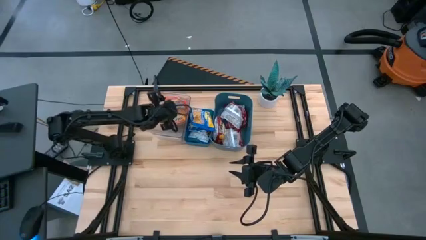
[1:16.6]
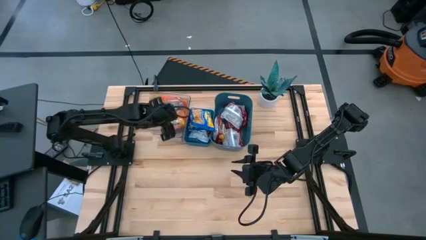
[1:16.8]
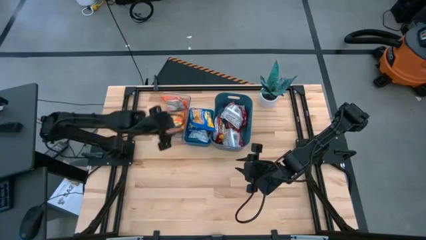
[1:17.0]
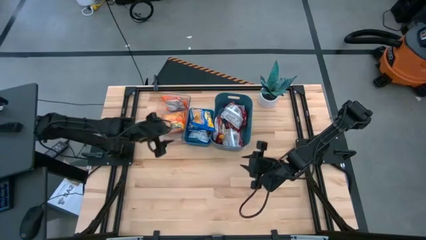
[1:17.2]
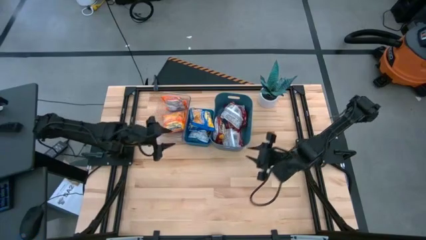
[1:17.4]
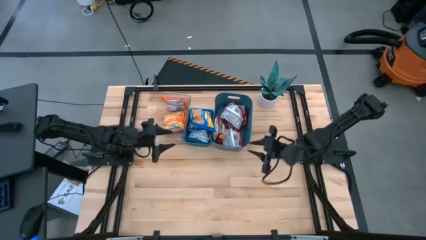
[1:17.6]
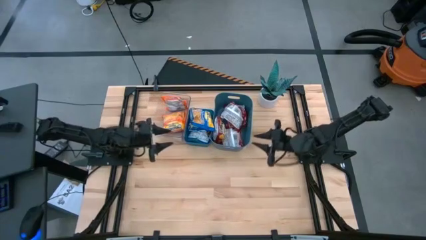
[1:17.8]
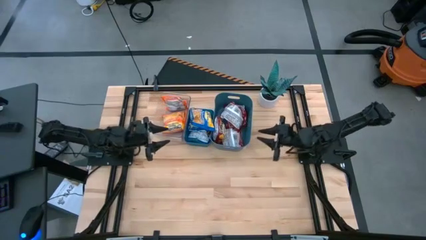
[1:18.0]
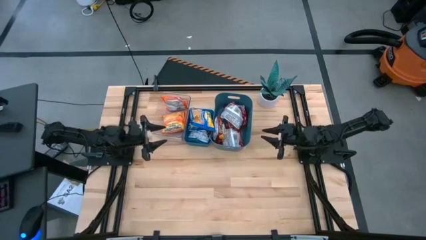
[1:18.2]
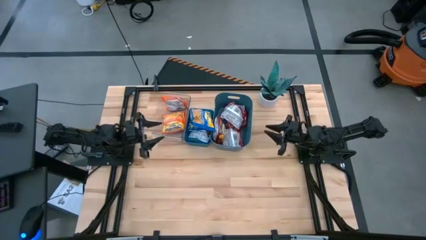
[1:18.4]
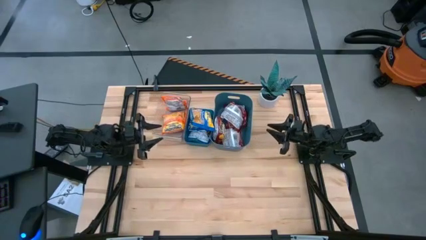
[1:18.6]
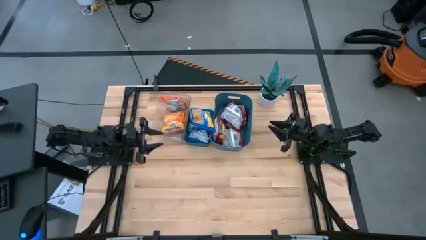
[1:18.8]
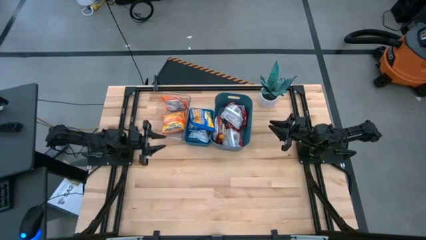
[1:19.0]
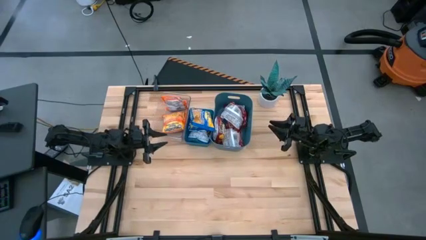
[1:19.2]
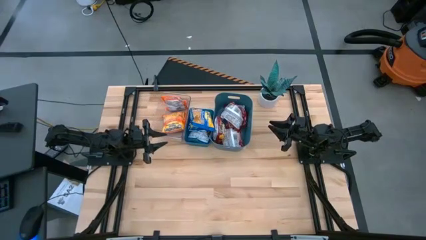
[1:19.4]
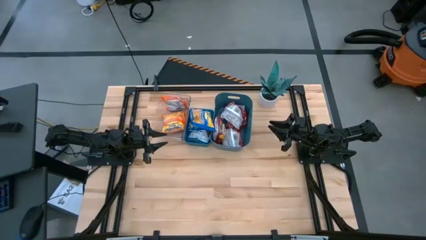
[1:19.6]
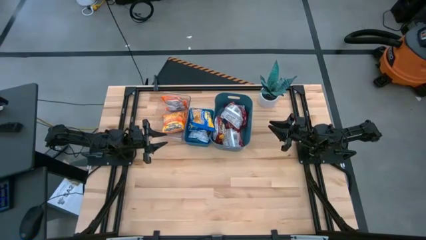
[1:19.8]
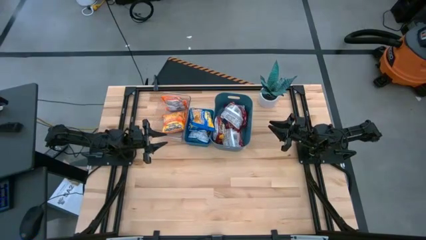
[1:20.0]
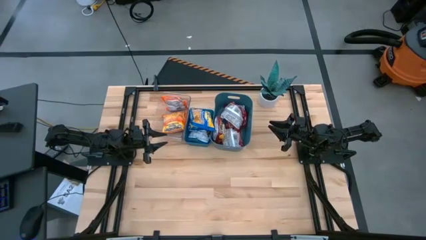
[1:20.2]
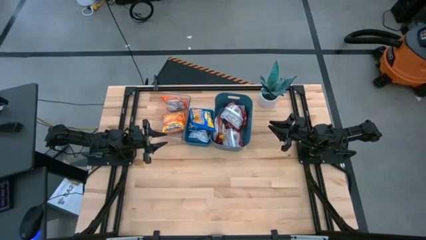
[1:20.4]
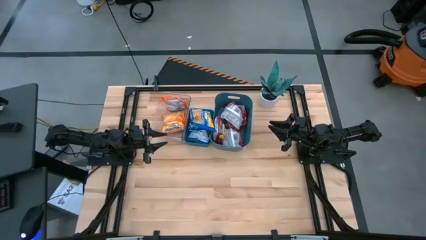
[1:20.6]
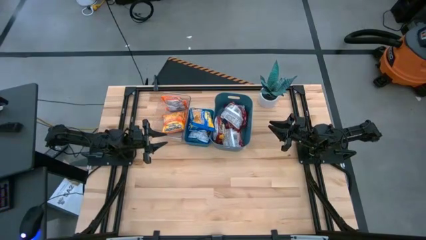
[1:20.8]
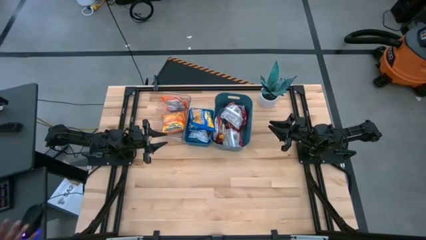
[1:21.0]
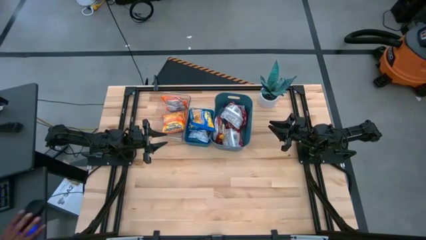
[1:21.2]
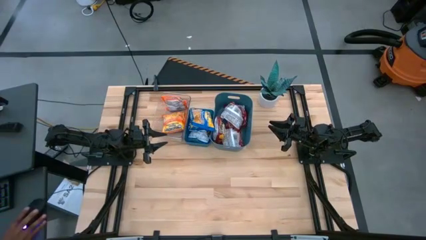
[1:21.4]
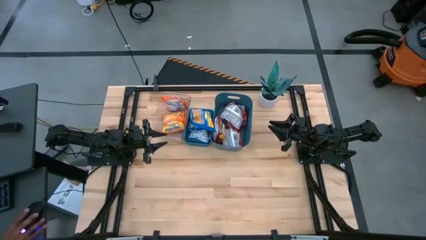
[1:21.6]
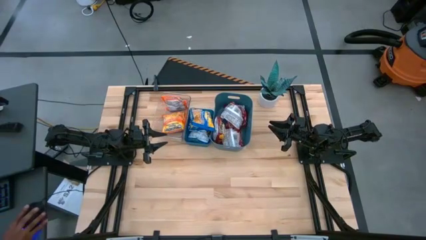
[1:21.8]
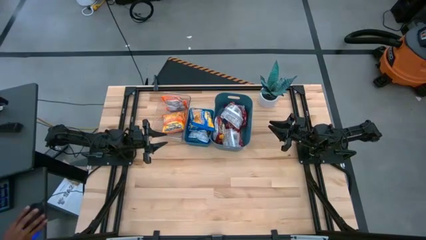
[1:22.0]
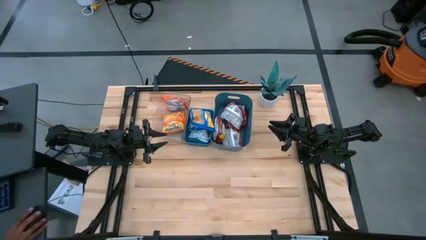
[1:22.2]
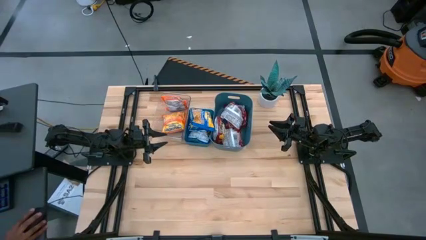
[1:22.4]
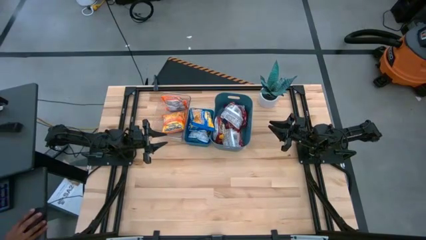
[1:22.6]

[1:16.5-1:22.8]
Task: Sort Maruchan noodles
Return to Home Position

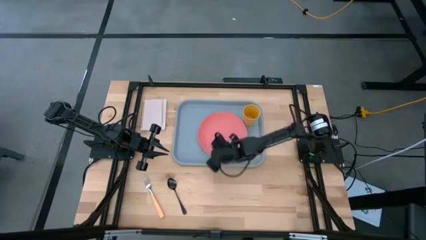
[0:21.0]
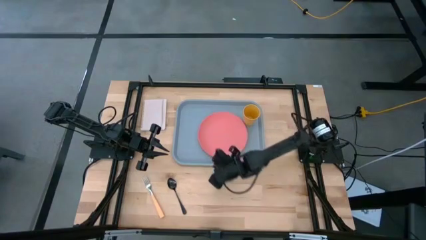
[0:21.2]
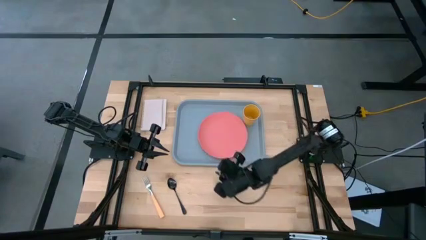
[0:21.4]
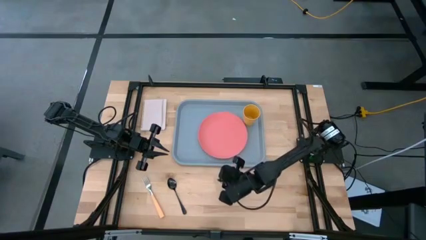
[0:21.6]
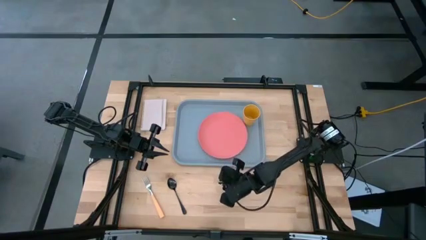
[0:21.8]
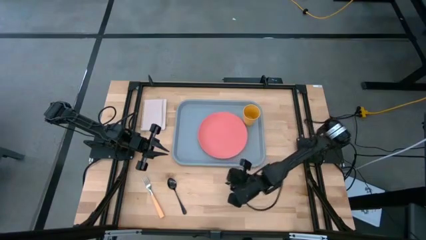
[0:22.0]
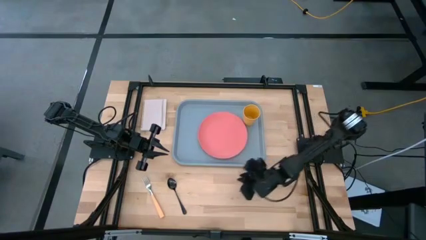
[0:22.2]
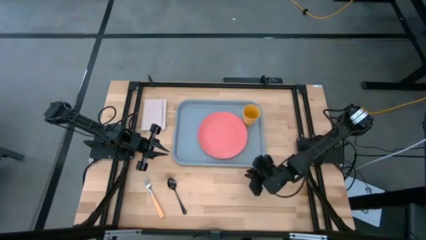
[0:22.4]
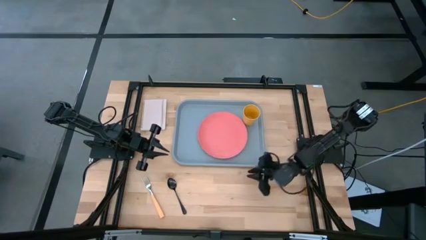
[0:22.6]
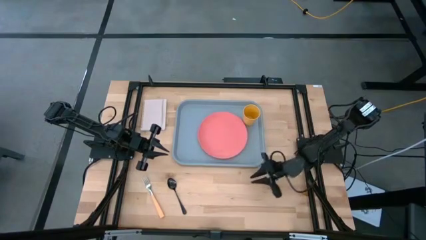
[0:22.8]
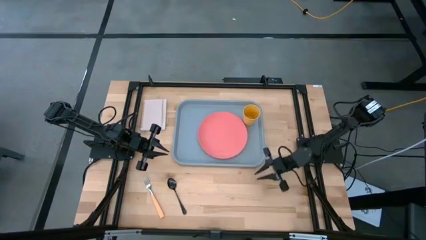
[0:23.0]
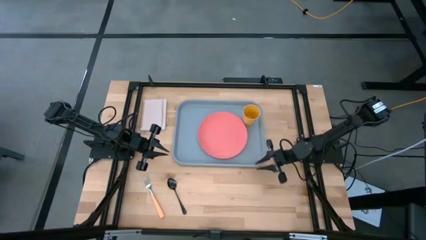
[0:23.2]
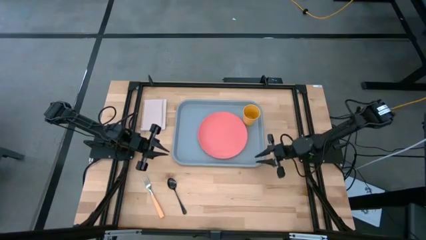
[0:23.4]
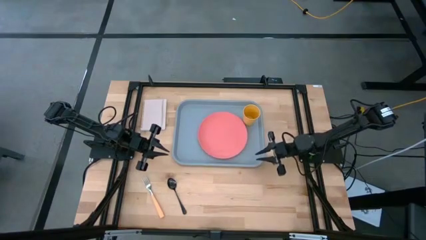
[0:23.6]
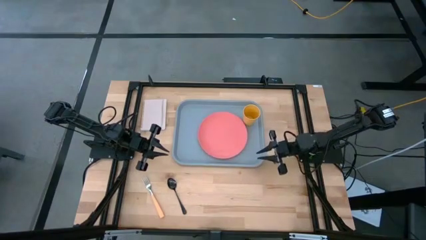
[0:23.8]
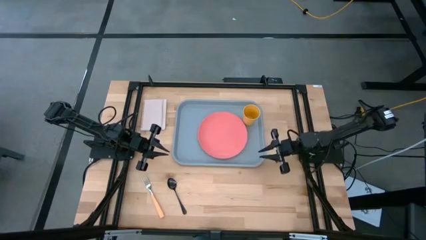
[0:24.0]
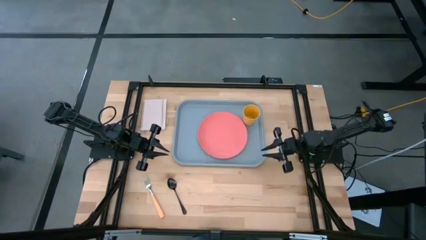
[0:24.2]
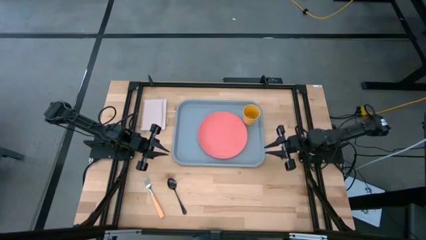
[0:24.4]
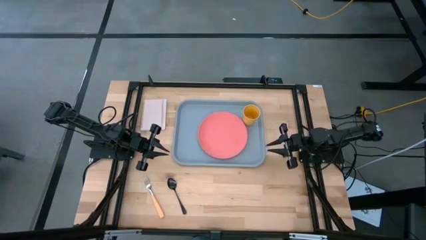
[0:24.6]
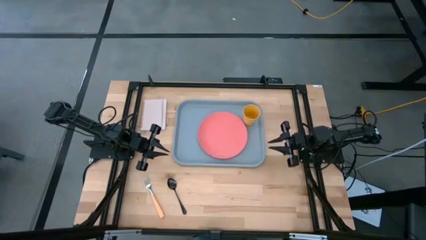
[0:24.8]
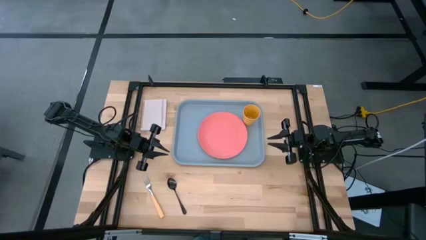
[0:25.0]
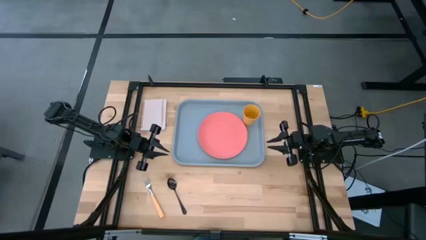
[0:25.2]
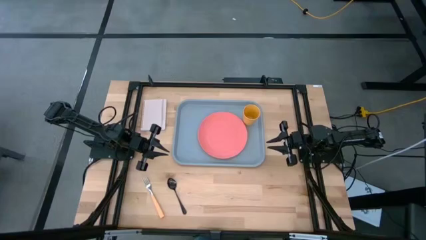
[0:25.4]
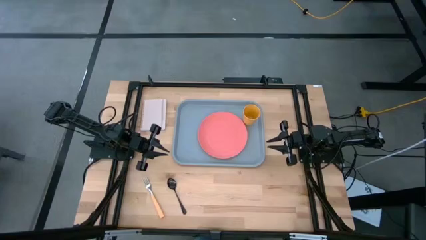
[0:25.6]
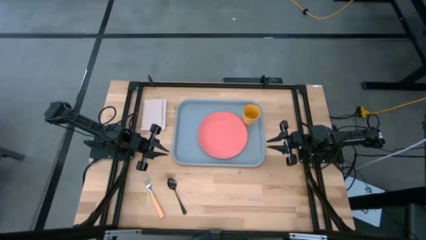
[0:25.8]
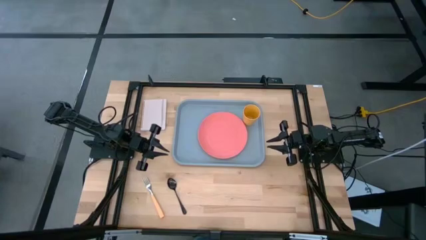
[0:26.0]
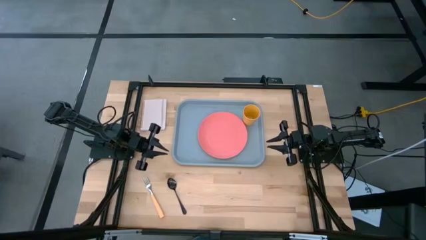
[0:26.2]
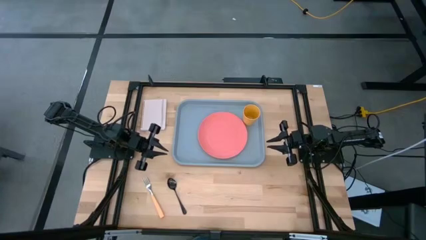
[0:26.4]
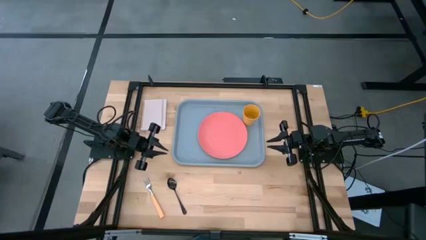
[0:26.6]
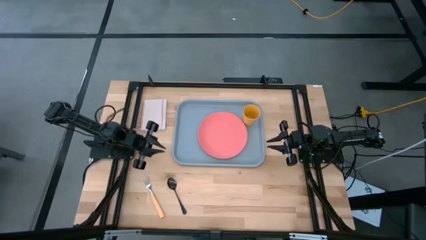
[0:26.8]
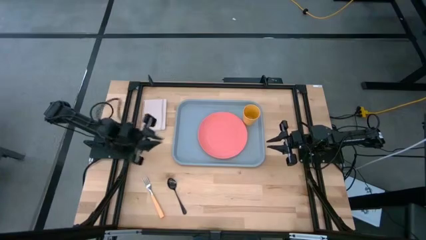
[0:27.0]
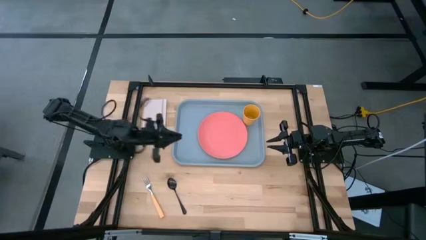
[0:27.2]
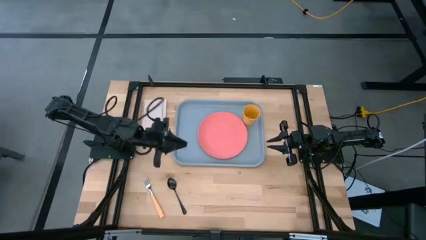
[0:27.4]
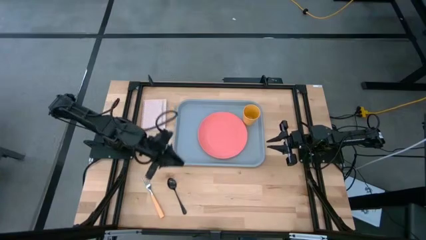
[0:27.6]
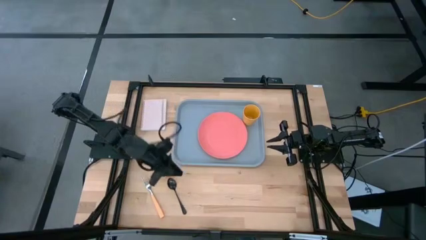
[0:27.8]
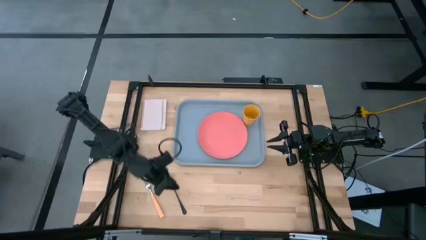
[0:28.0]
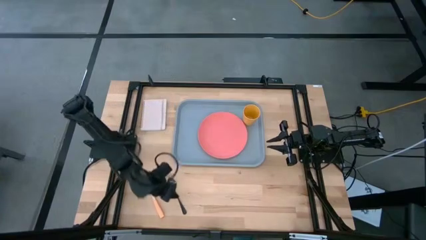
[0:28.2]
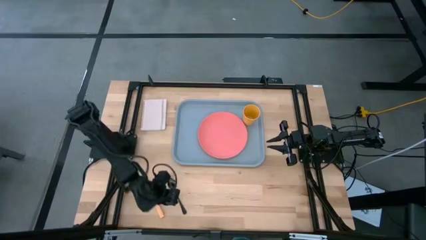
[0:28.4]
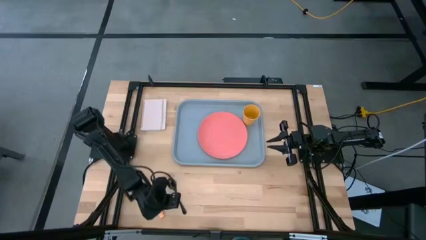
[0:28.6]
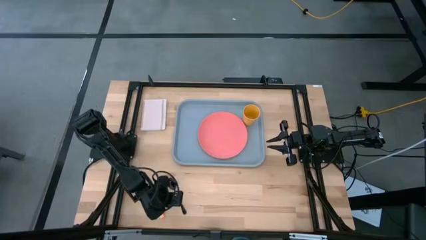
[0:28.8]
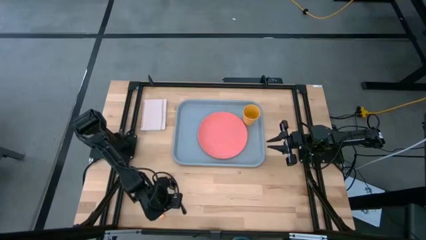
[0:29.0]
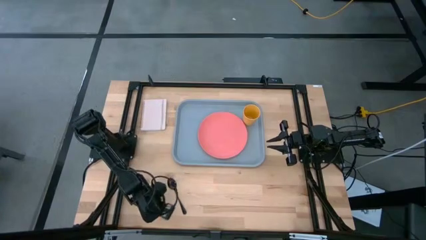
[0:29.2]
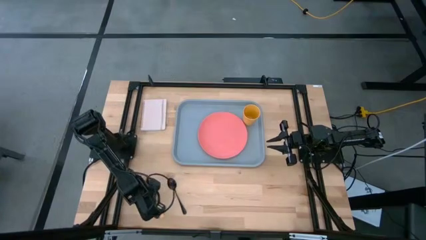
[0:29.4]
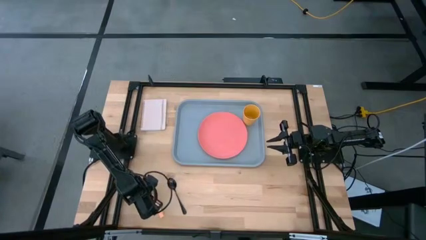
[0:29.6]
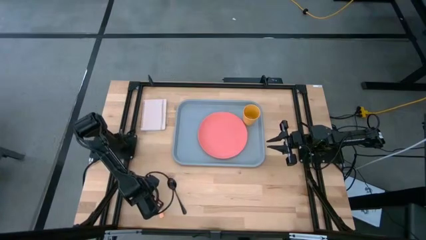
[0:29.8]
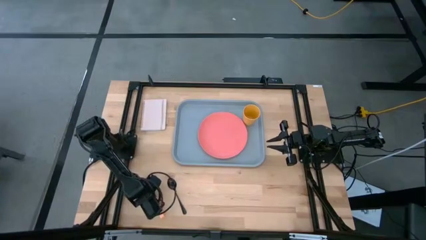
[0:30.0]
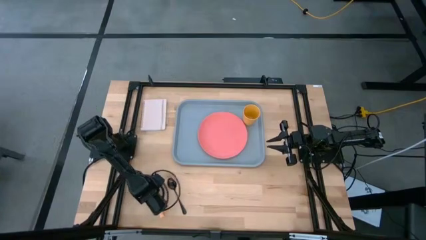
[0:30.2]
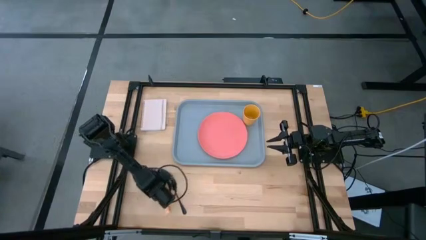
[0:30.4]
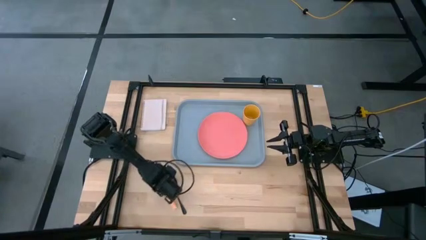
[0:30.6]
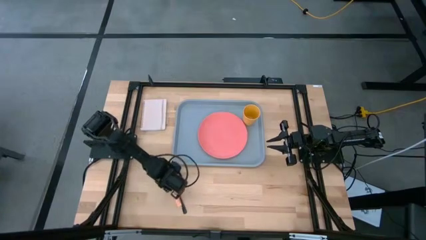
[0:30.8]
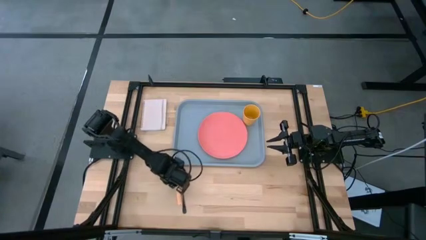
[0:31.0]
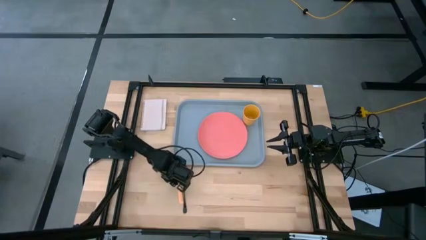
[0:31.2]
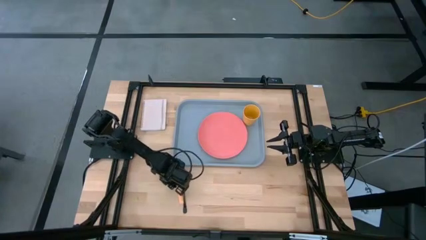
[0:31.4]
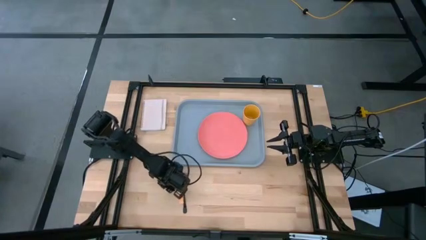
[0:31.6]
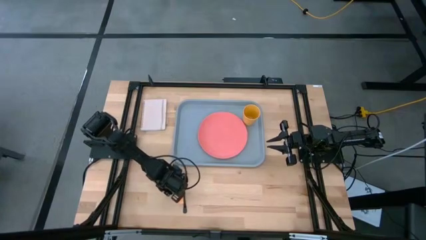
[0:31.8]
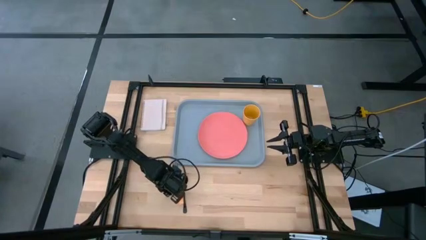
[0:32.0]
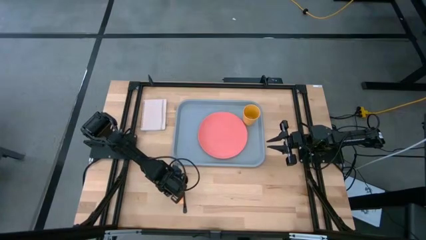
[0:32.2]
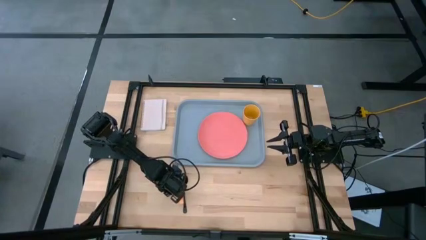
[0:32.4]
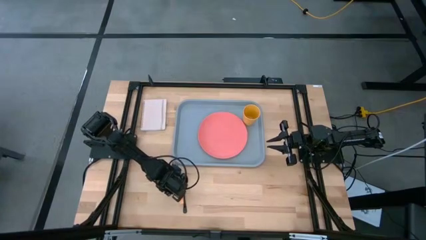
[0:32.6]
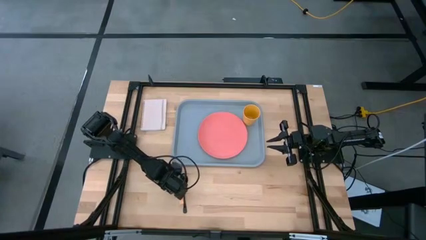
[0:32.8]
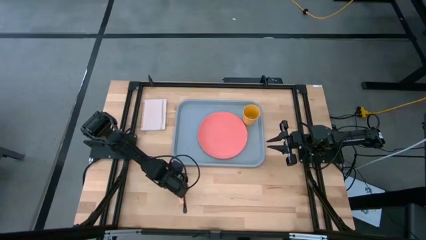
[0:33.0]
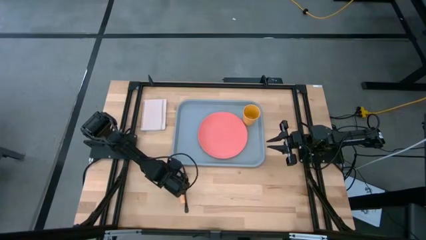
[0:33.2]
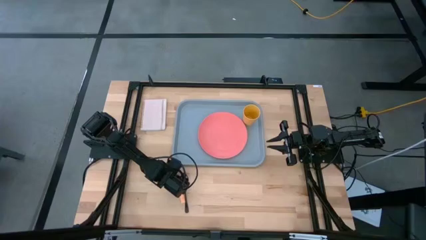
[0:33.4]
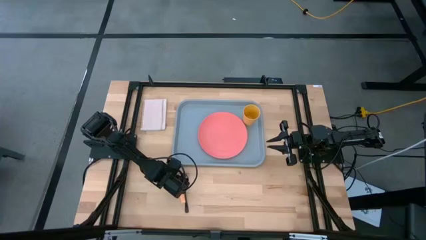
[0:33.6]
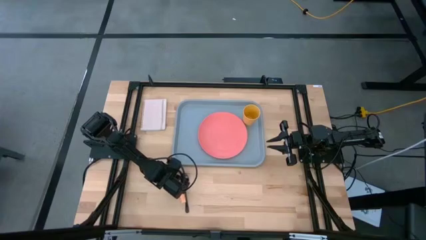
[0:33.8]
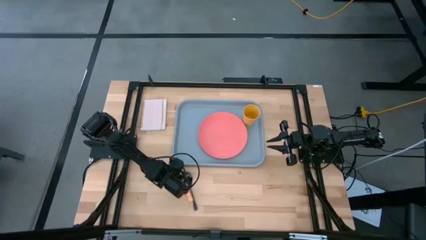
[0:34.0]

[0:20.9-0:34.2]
Task: Pick and place plate/cup/fork/spoon on tray
Move the fork on the table
